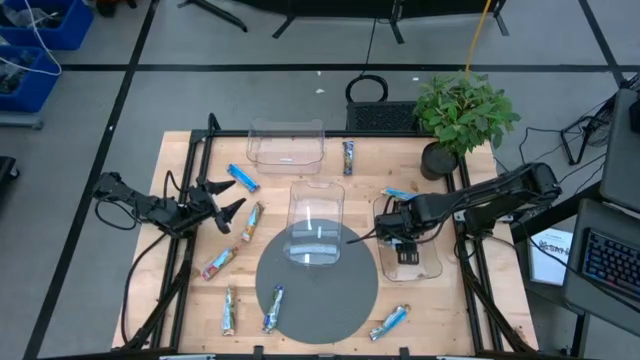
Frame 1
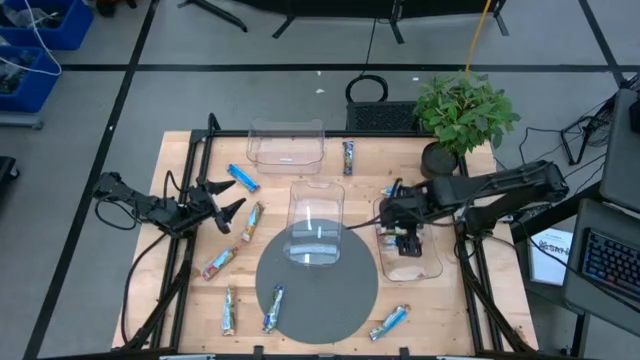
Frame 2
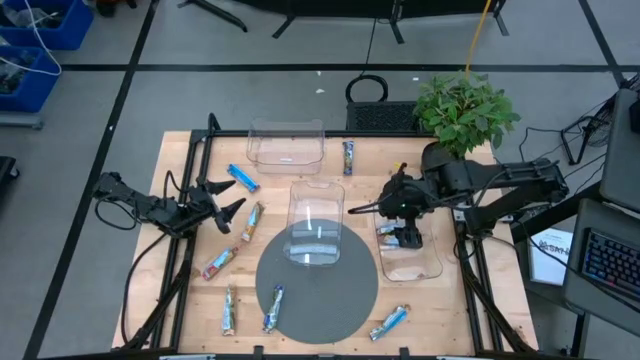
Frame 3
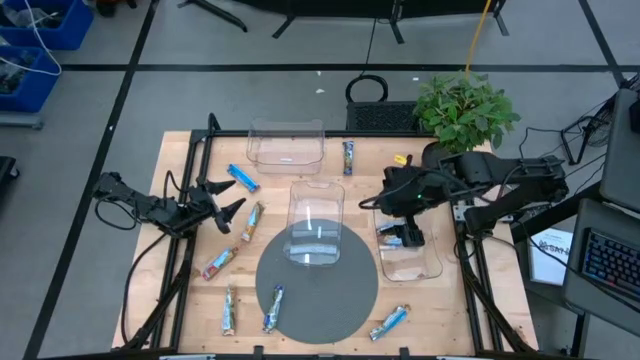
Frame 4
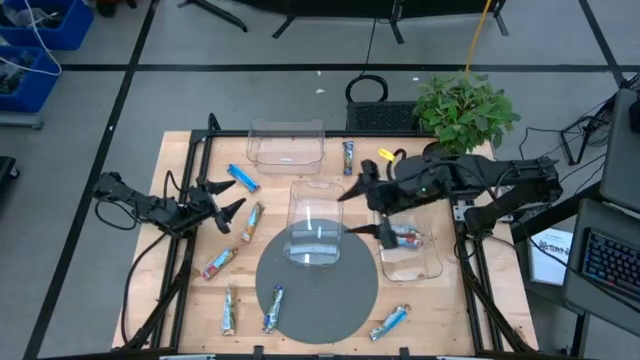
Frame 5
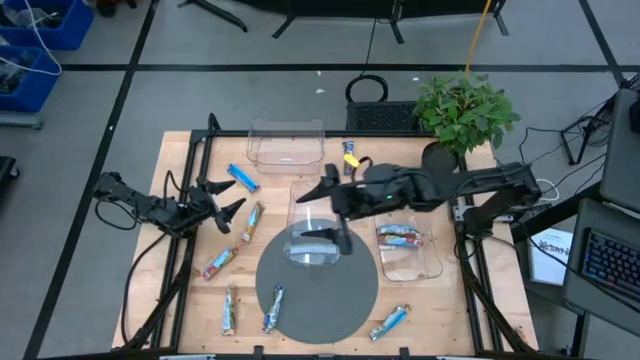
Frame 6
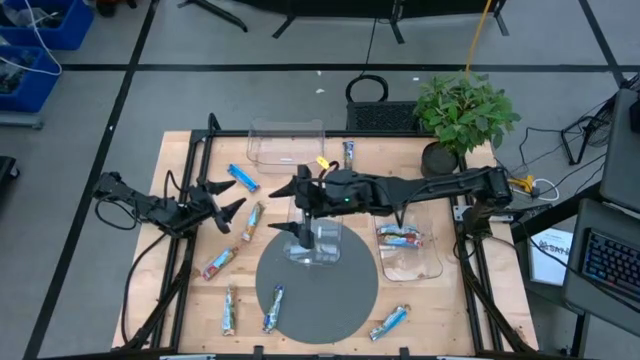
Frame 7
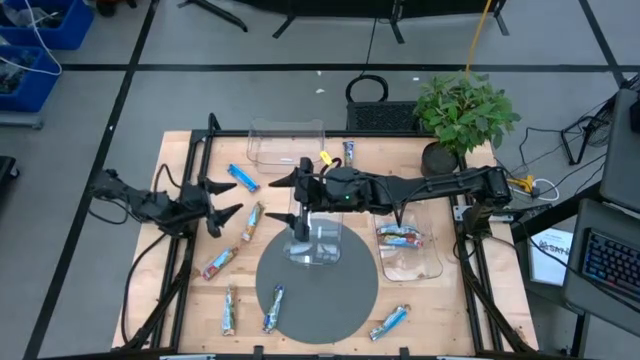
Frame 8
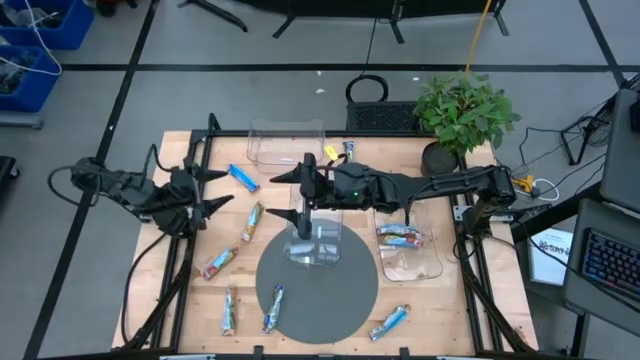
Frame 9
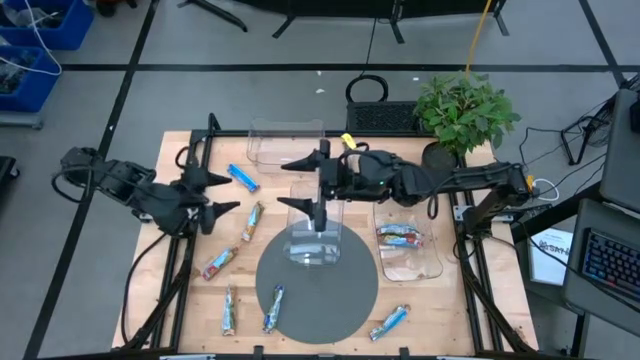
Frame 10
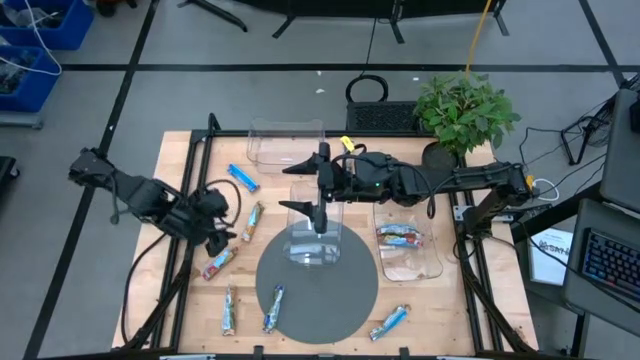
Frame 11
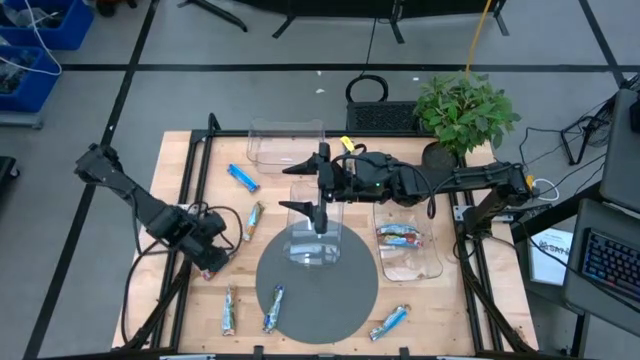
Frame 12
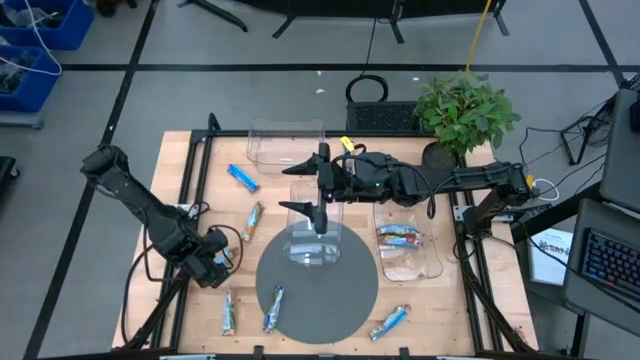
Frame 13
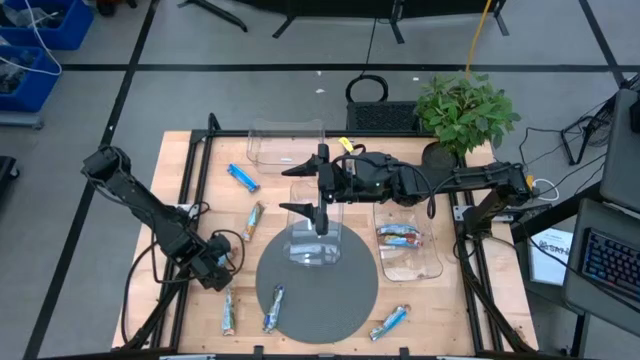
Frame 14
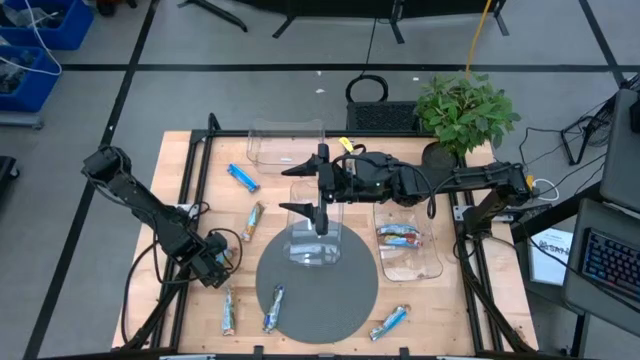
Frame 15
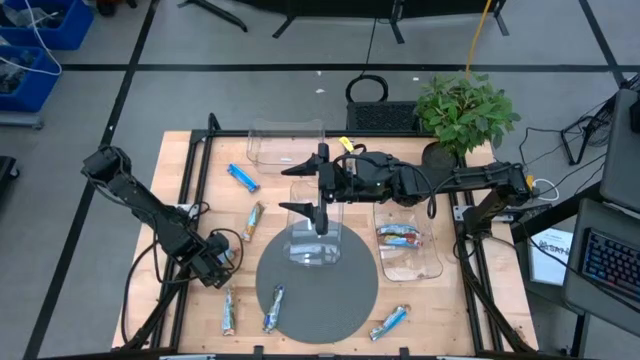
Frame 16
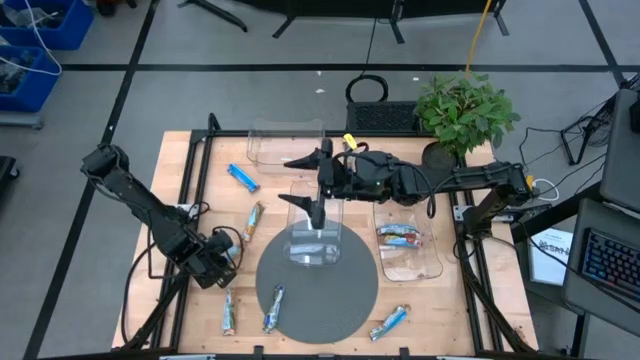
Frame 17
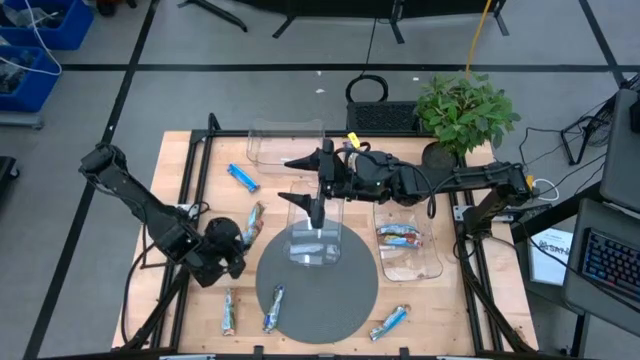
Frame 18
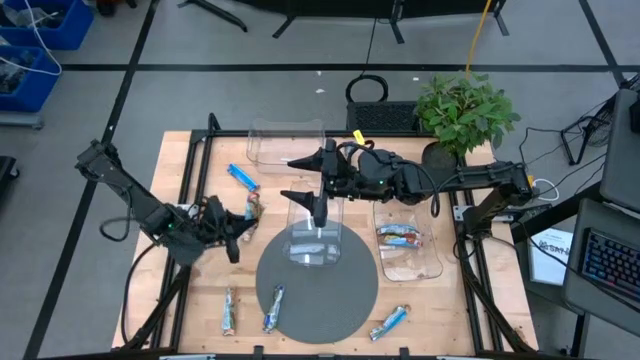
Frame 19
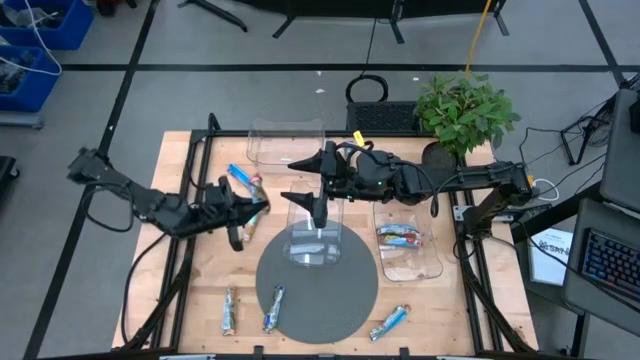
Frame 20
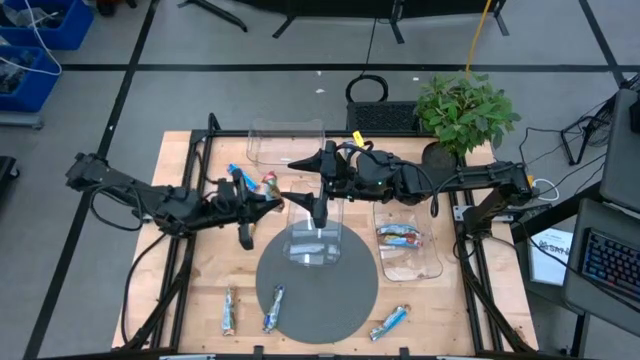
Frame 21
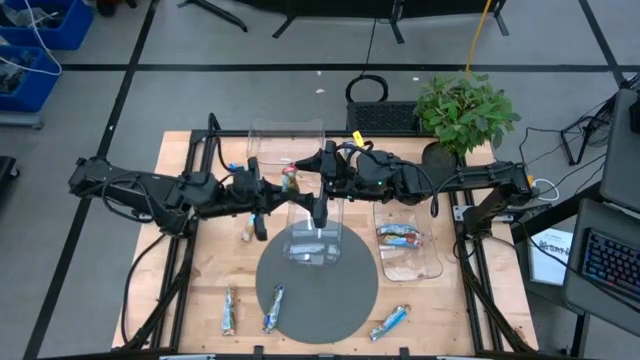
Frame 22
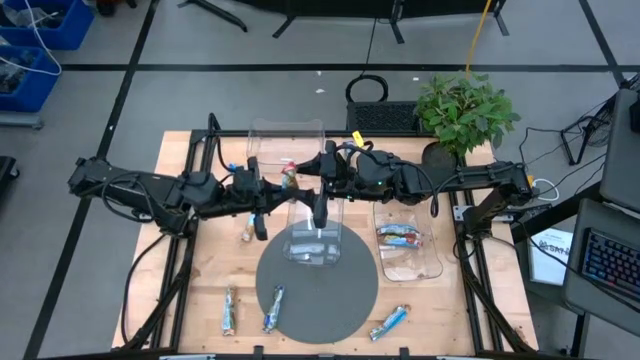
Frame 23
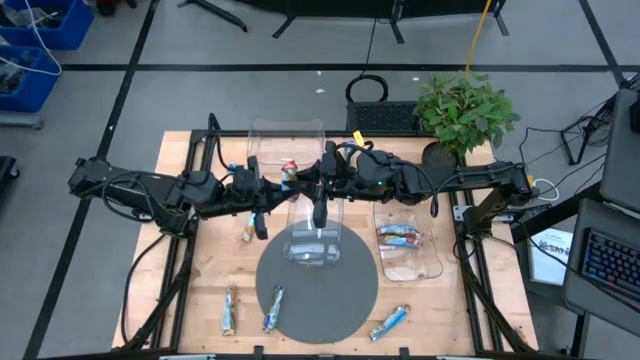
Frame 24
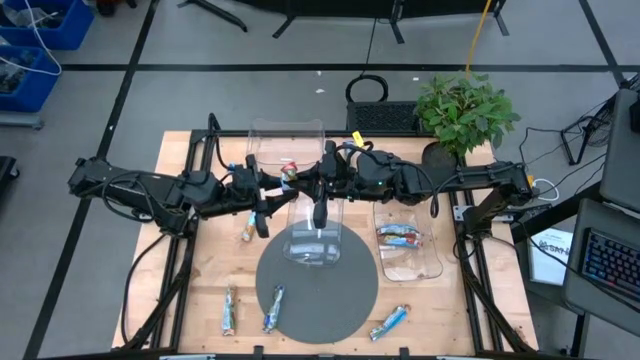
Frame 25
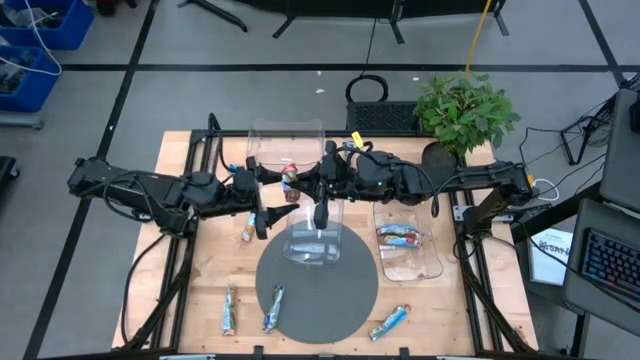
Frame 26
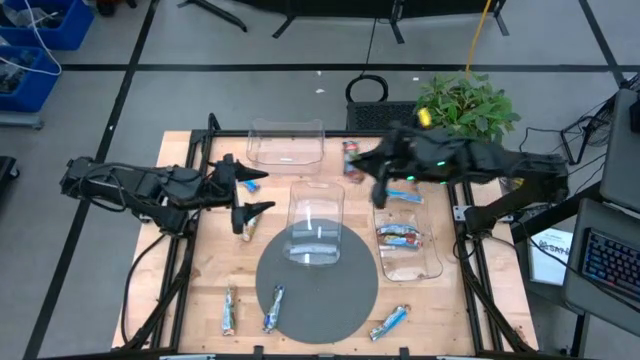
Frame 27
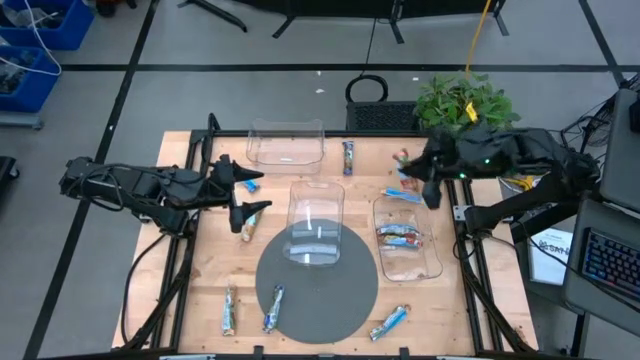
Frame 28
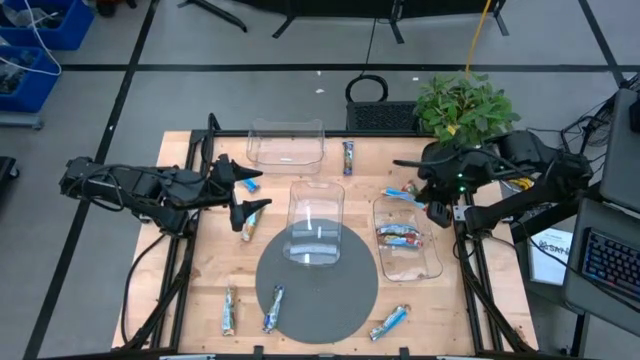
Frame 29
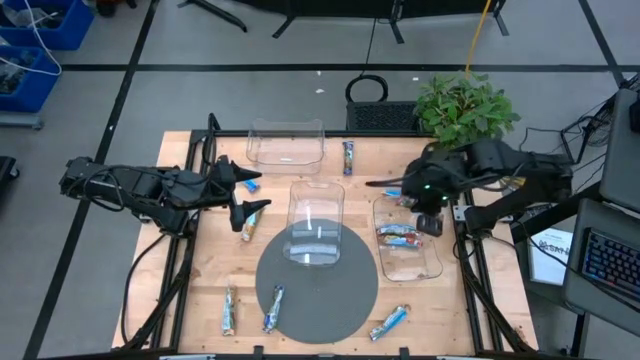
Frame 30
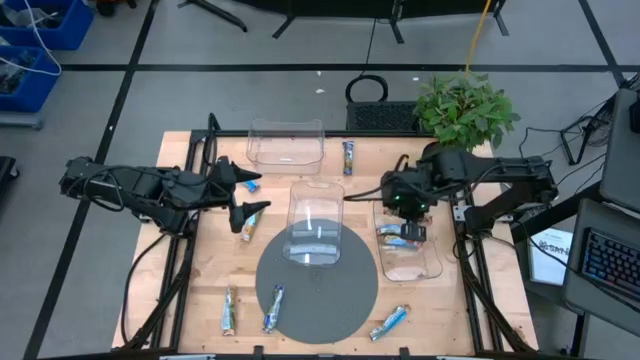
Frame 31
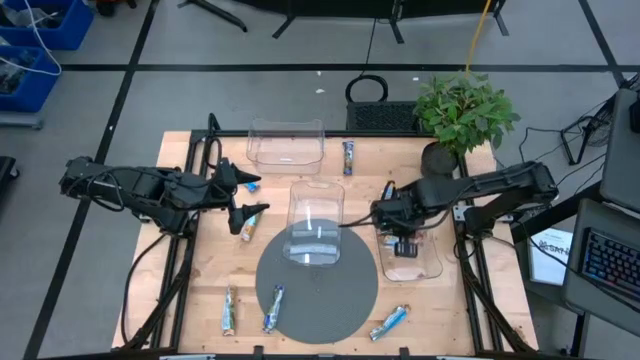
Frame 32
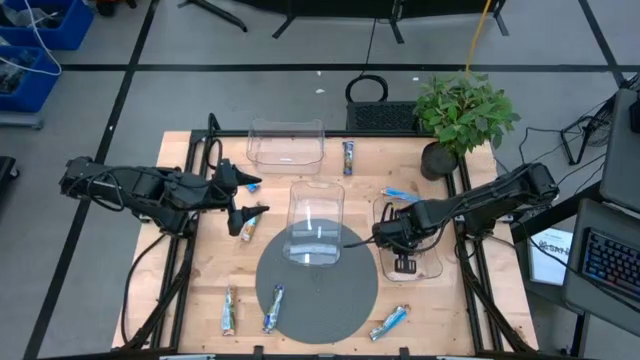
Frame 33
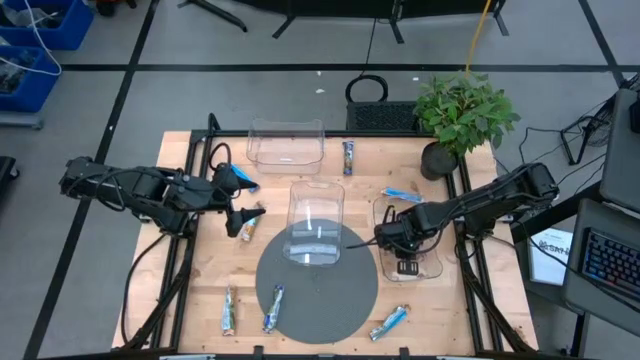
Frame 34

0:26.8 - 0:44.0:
Task: Pick and place Granola Bars by type
Put the red granola bar into the bottom right transparent bin

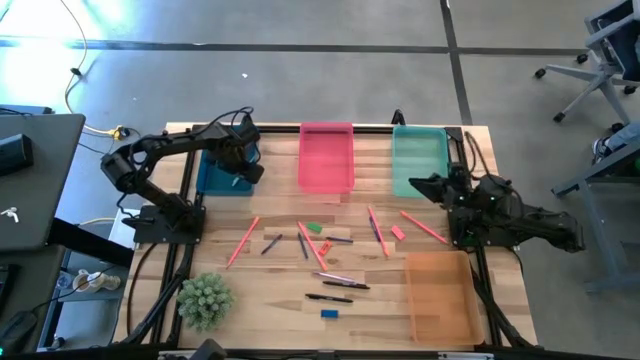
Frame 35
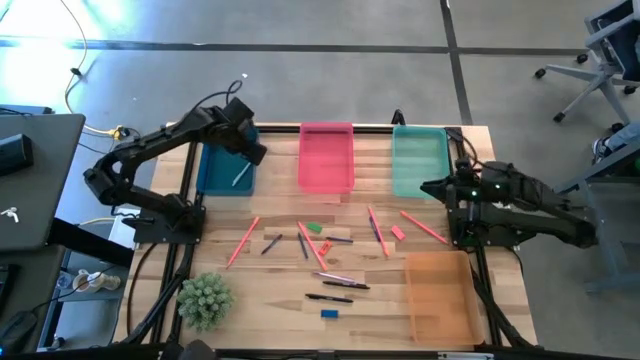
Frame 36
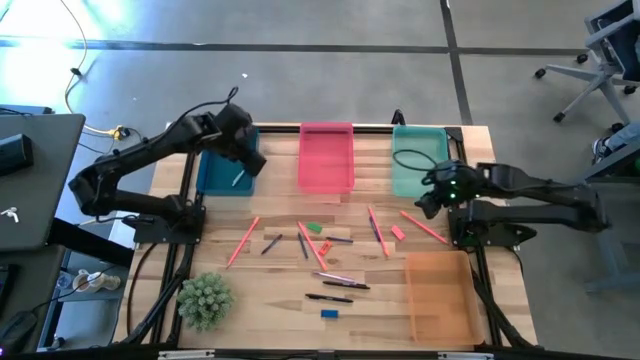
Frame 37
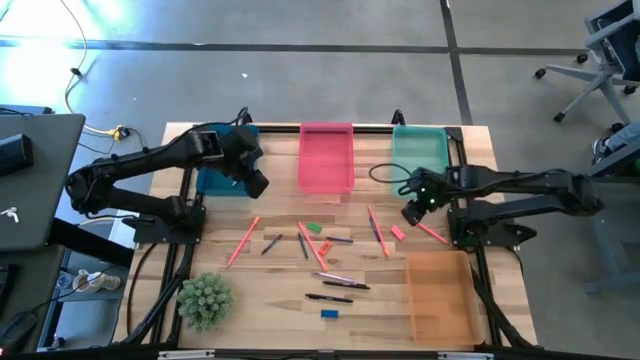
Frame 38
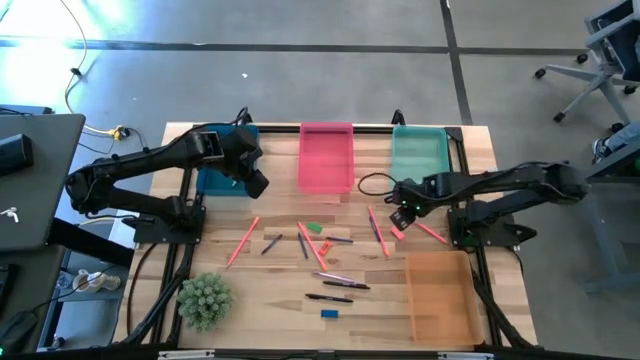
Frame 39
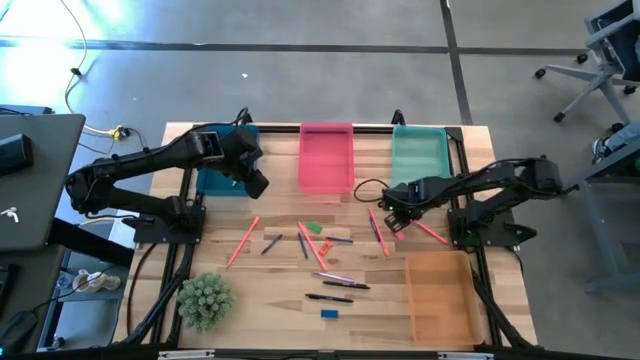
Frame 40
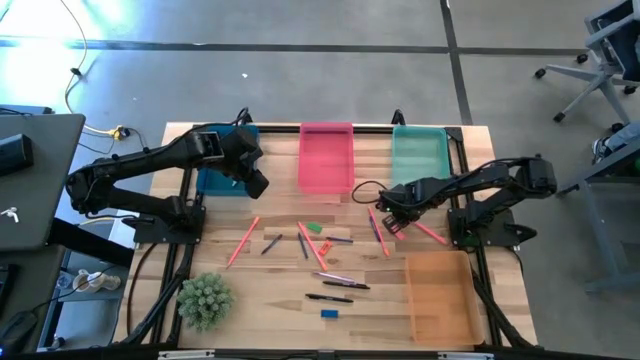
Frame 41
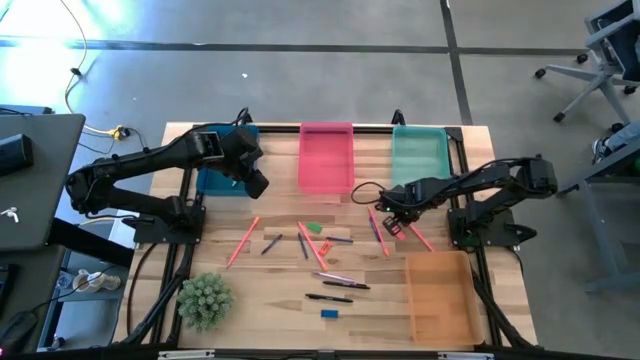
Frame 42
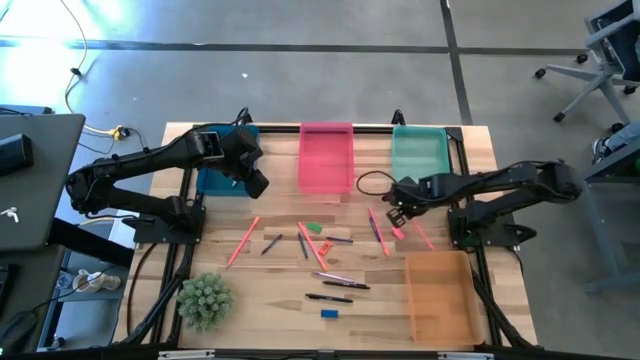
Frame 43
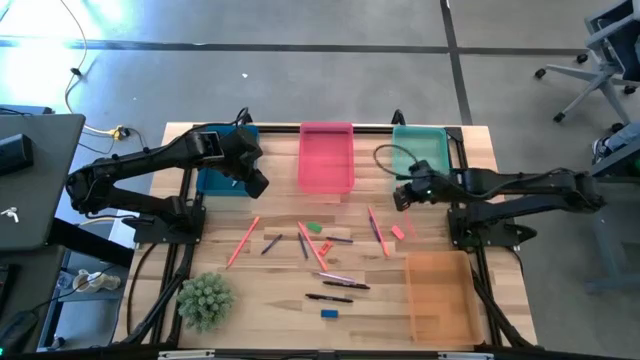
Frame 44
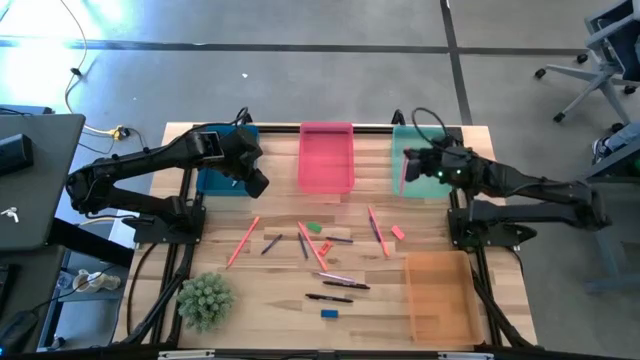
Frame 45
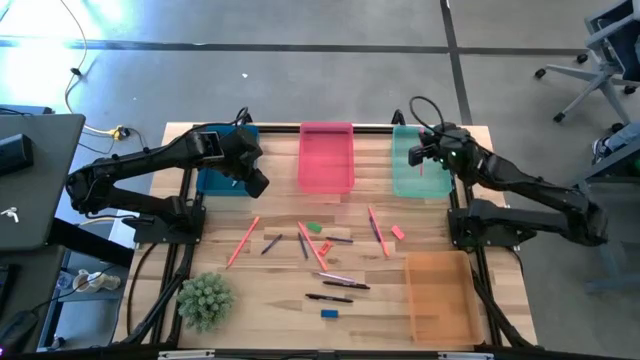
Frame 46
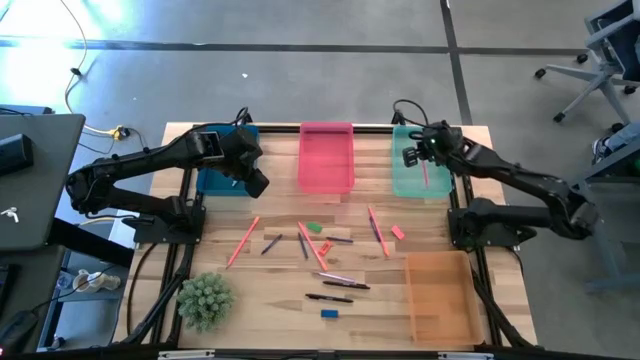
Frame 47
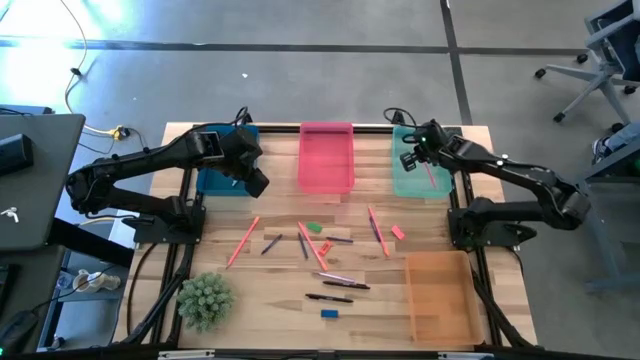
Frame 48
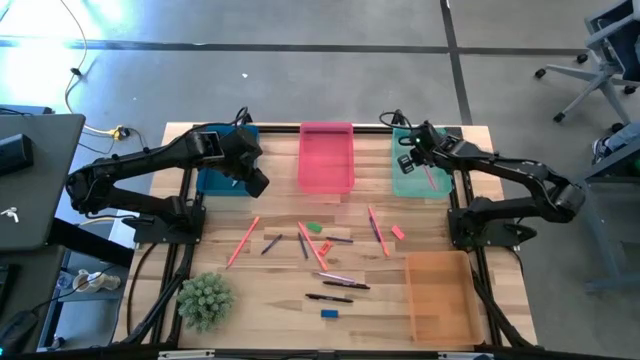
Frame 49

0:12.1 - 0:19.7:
Task: Sort crayons/erasers/pens/pencils in bins
Put the pink pencil into the green bin
